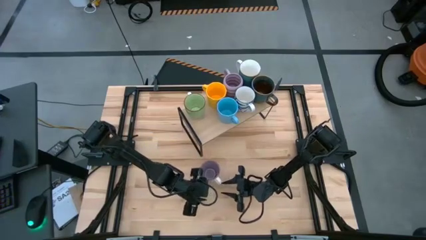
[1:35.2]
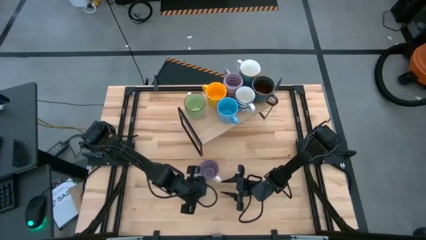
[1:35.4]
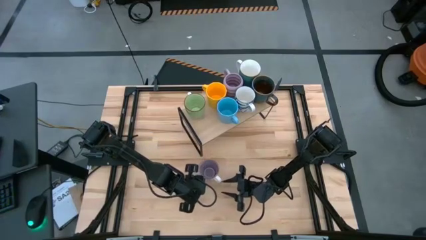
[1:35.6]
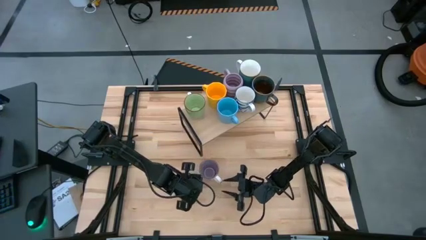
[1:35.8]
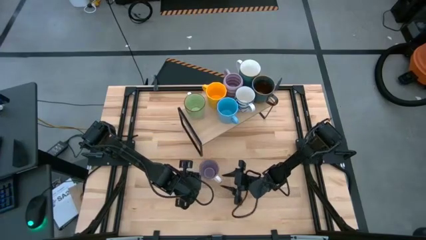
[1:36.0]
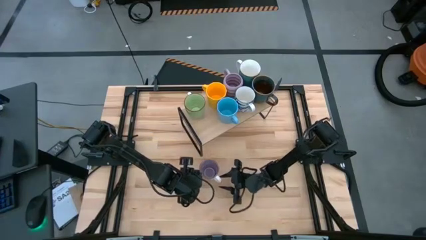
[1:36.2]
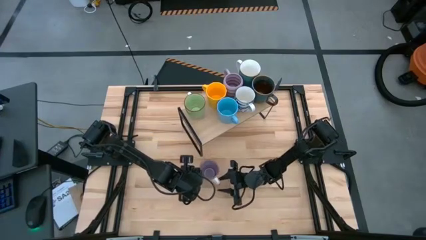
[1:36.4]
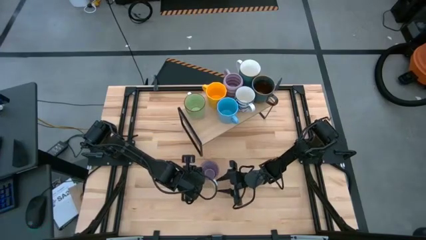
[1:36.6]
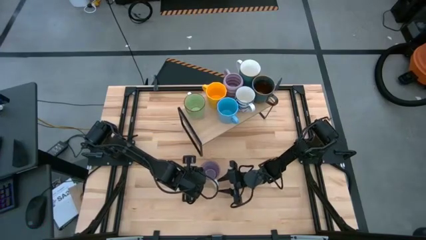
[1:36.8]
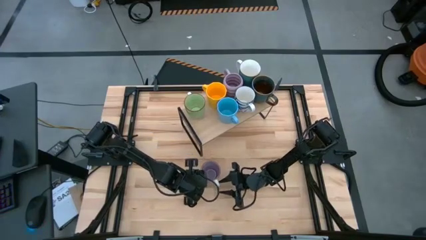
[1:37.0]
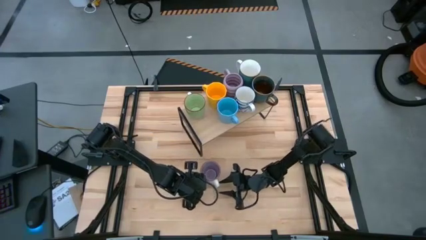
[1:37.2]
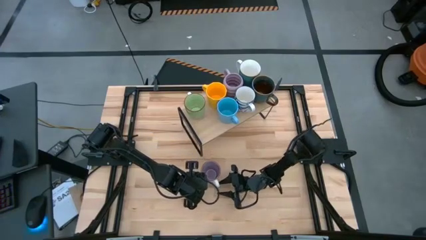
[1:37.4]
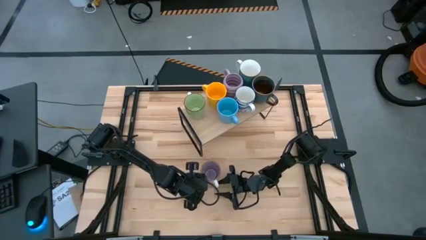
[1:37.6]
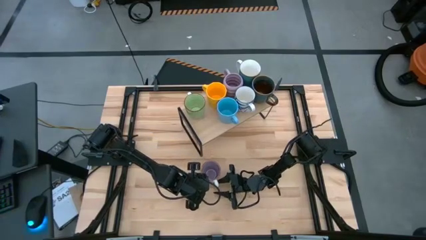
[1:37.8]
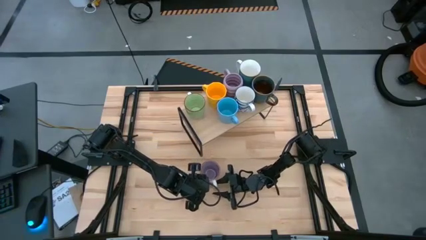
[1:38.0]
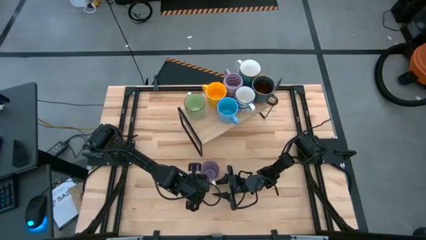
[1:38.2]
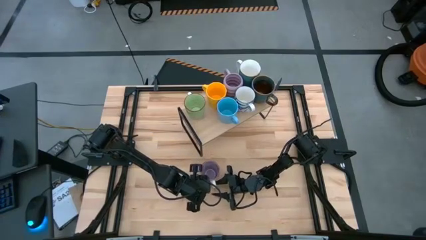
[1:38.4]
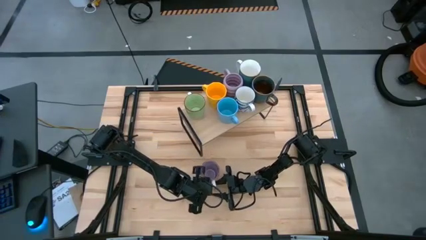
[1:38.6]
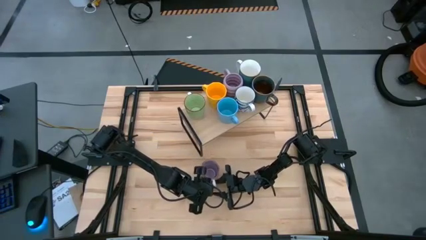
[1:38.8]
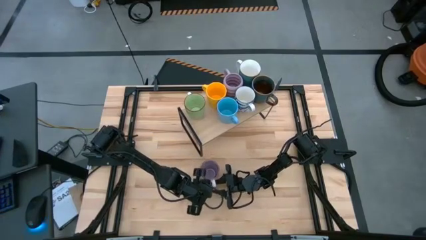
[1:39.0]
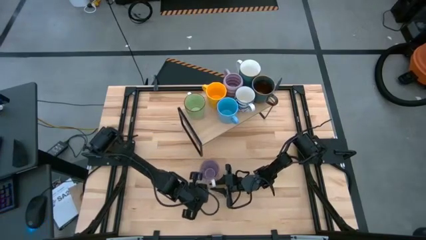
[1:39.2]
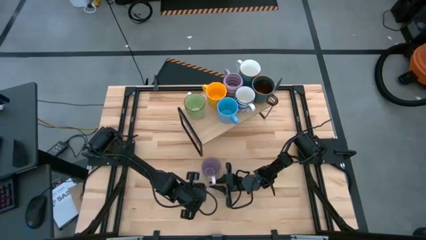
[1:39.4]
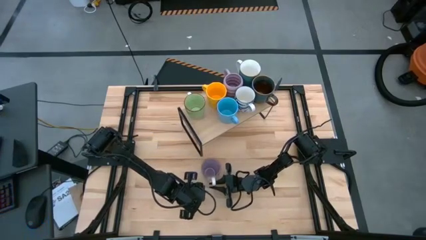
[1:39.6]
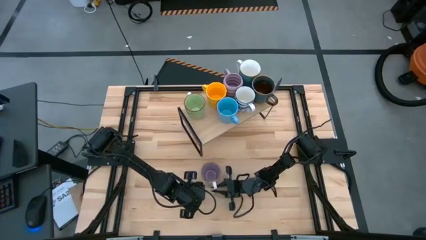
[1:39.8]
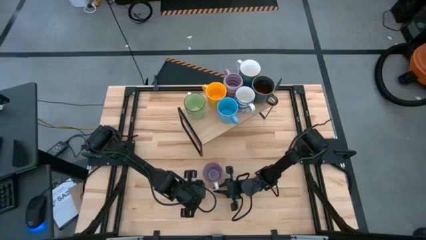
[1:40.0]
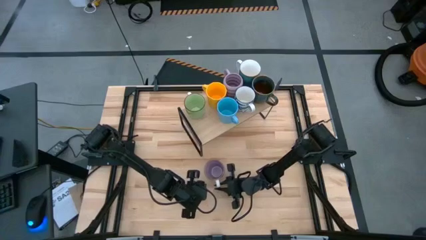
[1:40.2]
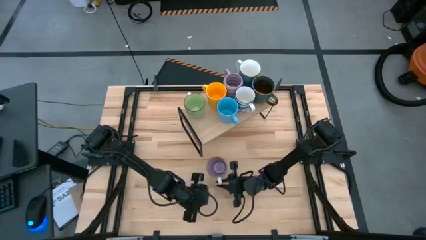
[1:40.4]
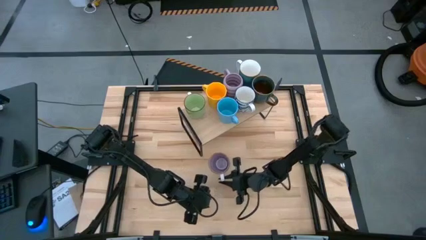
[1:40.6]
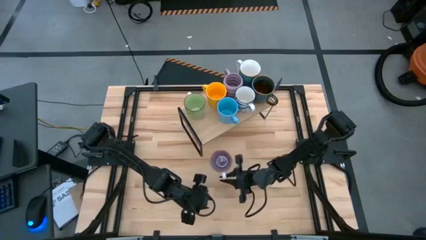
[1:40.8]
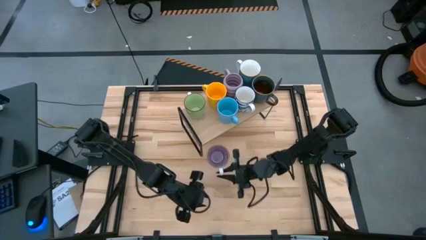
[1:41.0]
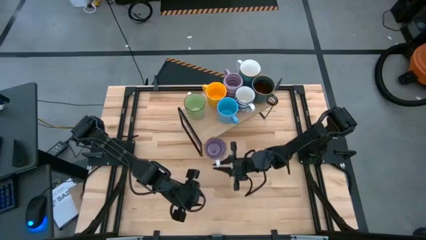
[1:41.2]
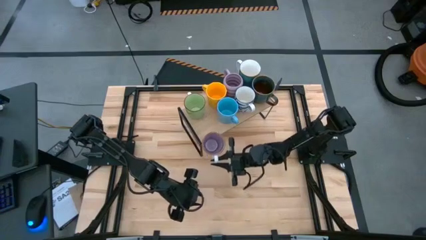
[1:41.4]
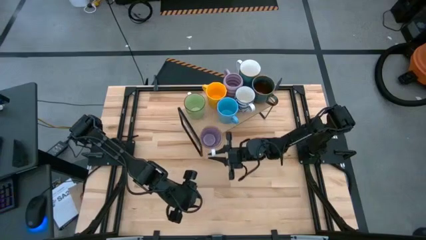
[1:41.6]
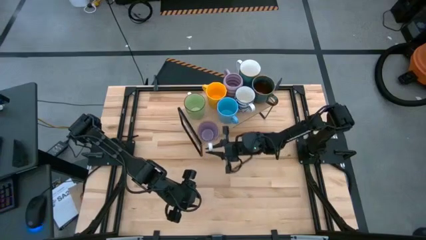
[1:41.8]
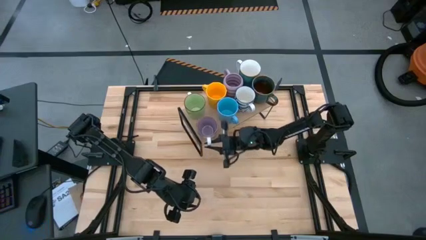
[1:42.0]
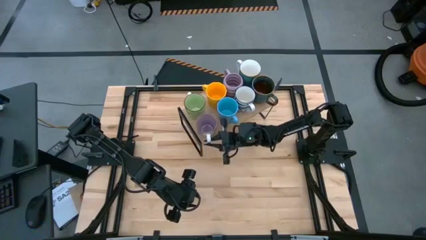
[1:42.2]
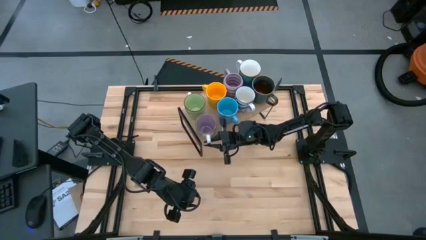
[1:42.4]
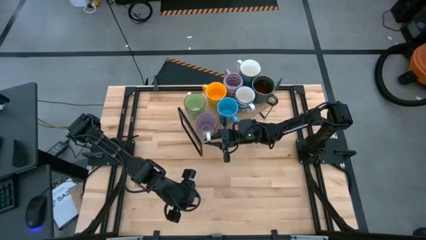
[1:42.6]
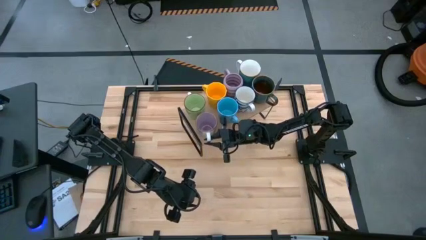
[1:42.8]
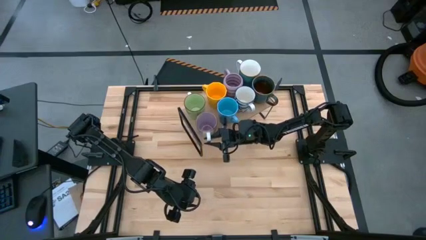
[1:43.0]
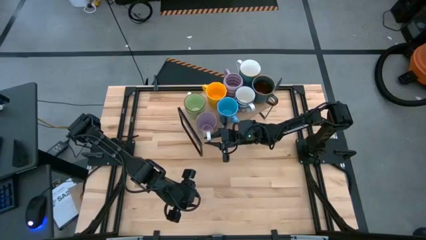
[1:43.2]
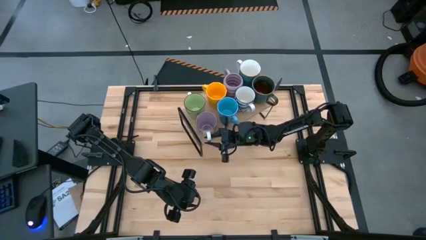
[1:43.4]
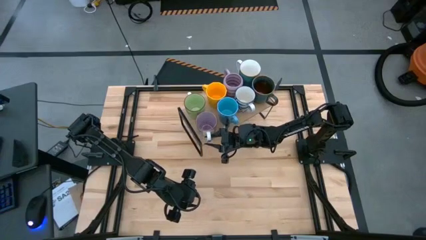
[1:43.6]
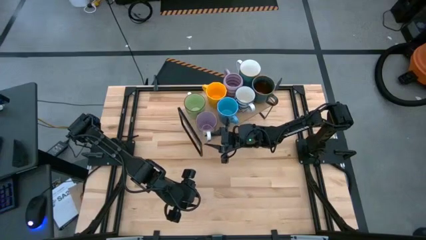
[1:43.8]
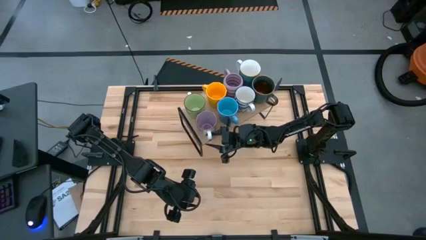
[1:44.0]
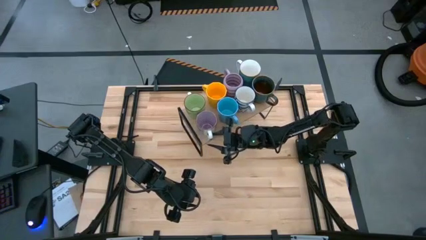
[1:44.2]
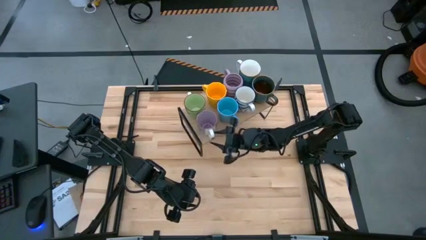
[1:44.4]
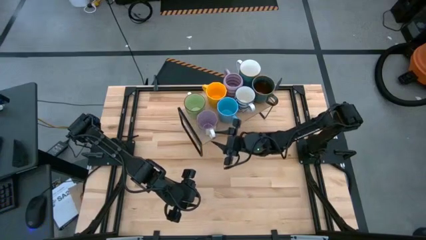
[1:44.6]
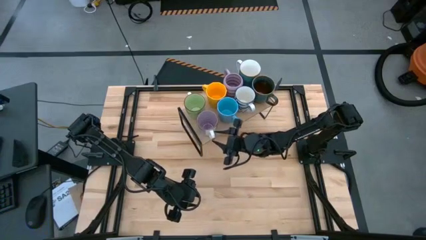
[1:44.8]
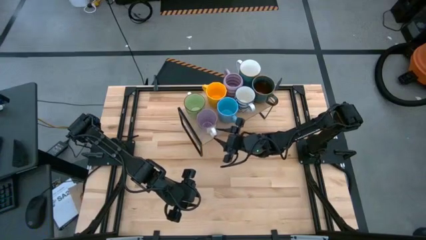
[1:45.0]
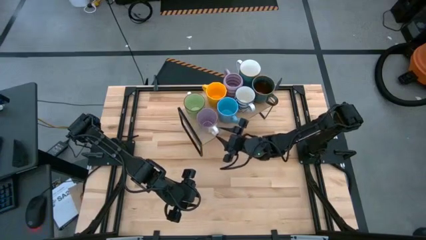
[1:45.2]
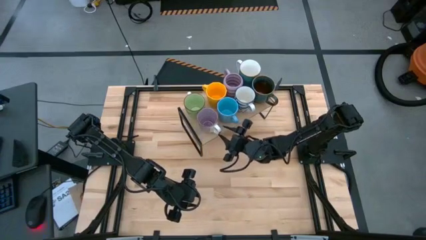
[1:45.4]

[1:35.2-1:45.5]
Task: Place coffee mugs
Put the purple mug on the shelf

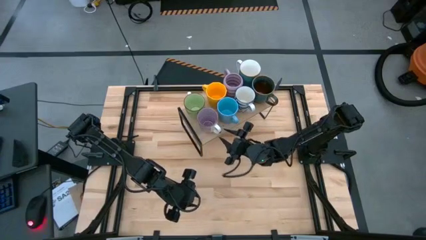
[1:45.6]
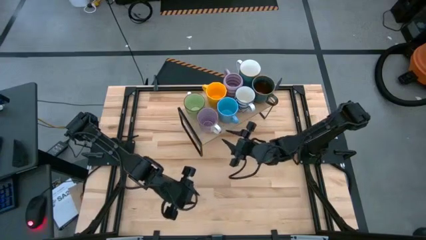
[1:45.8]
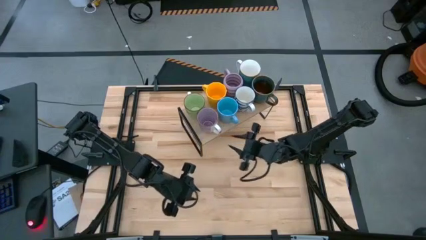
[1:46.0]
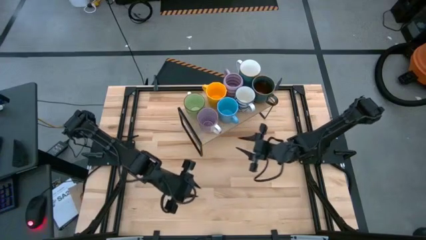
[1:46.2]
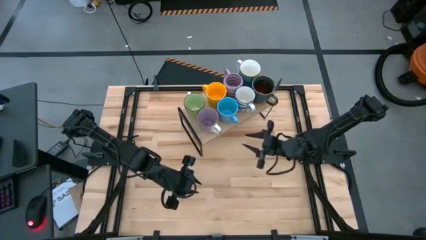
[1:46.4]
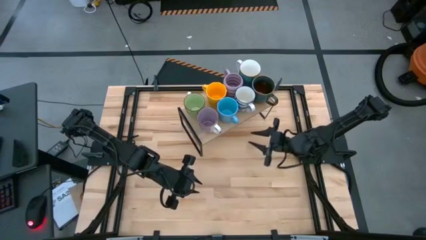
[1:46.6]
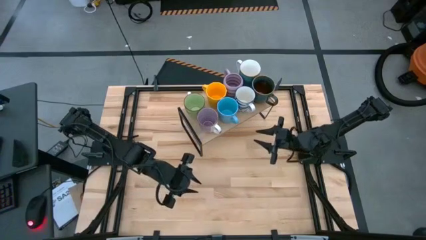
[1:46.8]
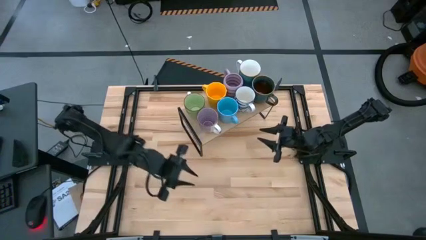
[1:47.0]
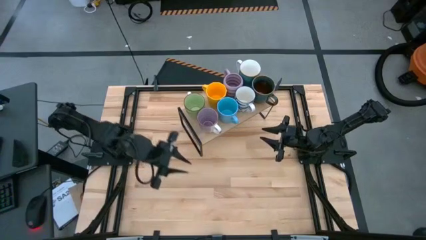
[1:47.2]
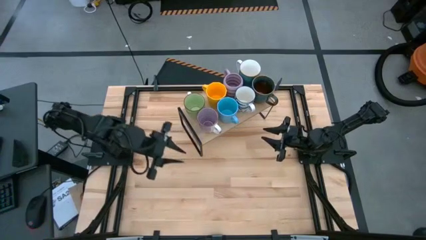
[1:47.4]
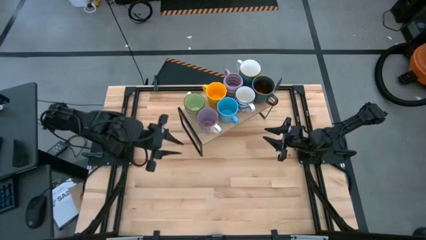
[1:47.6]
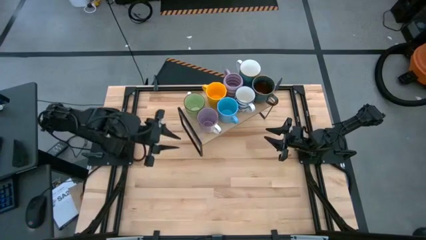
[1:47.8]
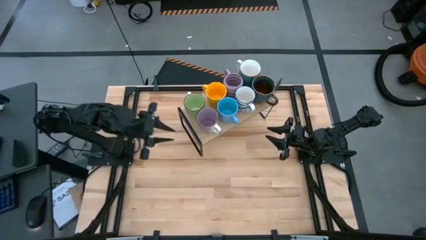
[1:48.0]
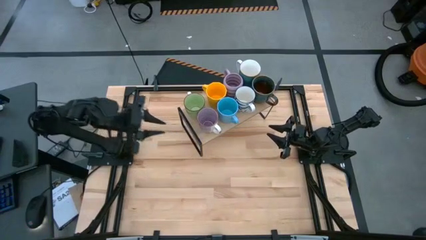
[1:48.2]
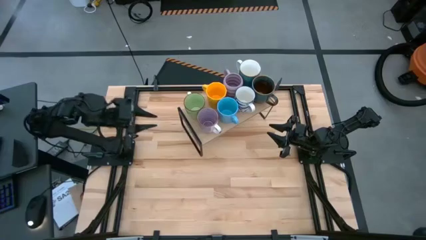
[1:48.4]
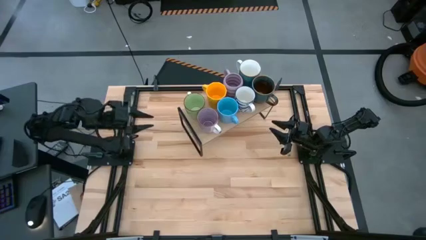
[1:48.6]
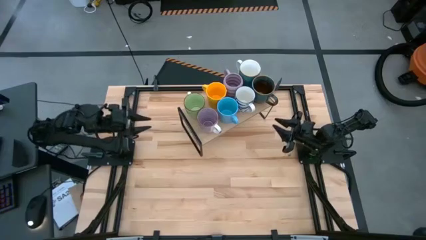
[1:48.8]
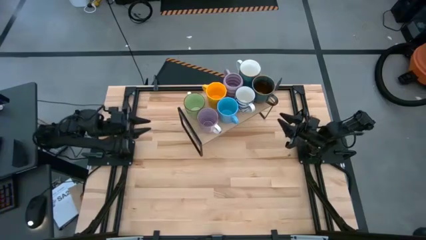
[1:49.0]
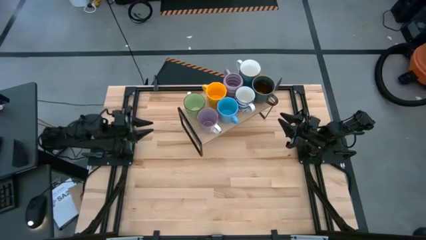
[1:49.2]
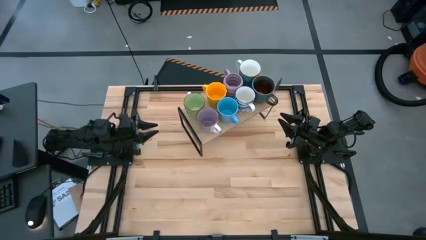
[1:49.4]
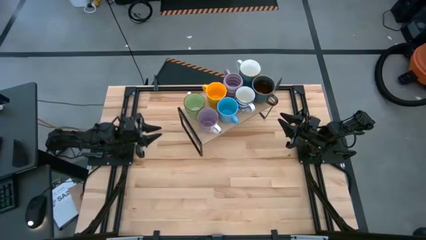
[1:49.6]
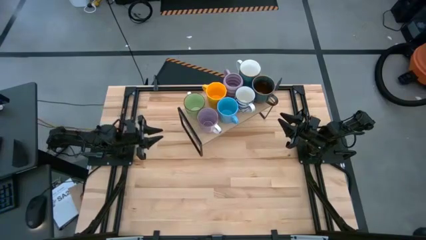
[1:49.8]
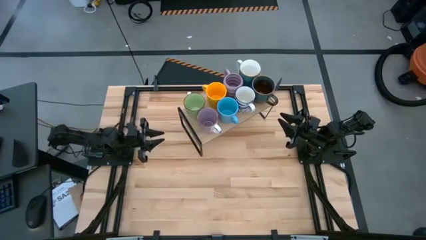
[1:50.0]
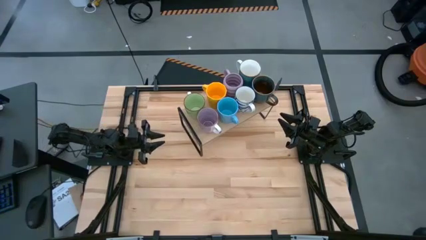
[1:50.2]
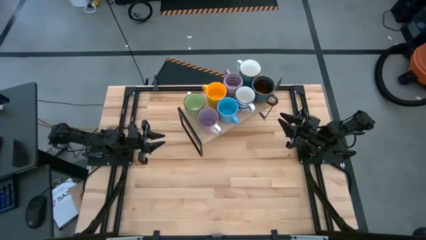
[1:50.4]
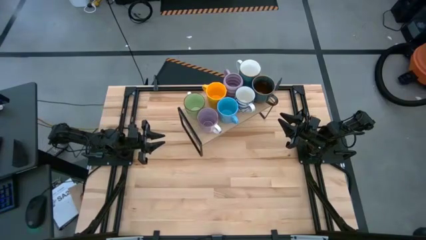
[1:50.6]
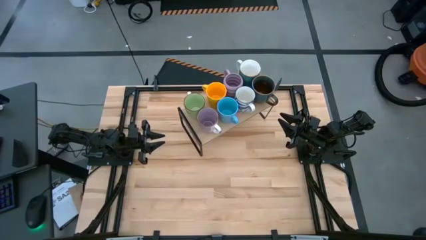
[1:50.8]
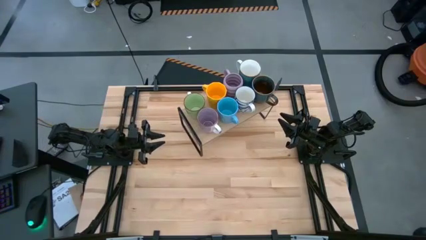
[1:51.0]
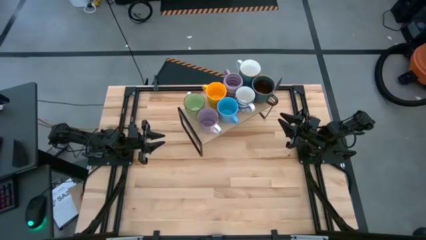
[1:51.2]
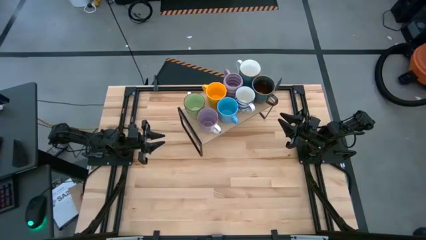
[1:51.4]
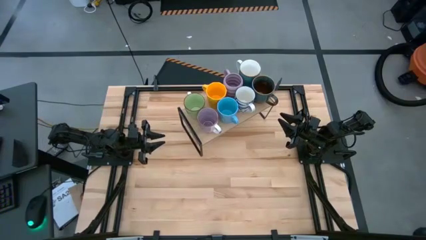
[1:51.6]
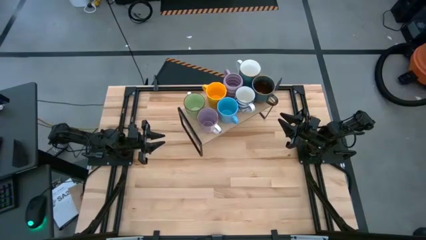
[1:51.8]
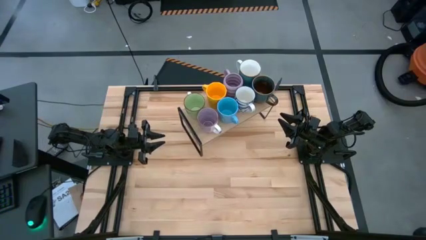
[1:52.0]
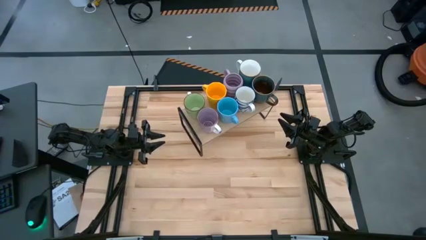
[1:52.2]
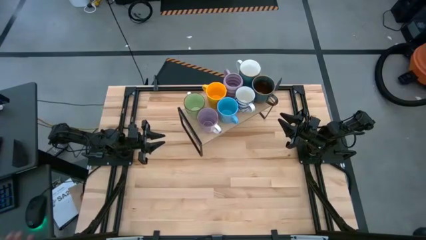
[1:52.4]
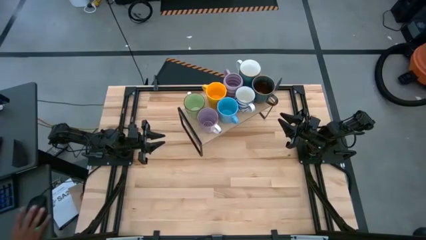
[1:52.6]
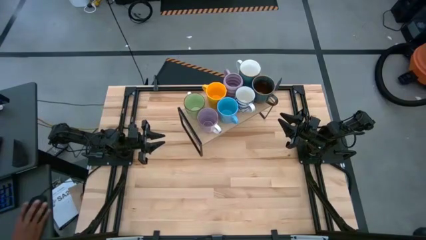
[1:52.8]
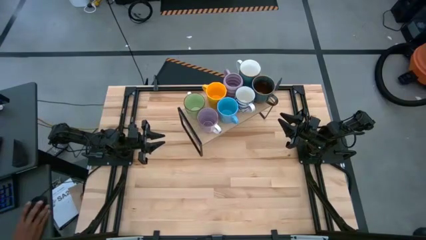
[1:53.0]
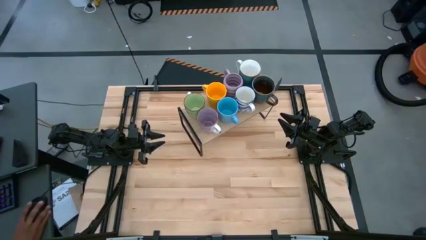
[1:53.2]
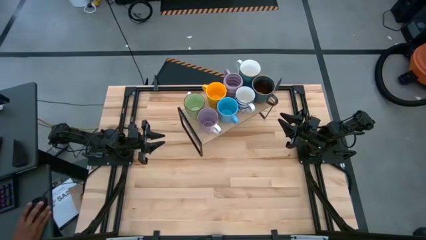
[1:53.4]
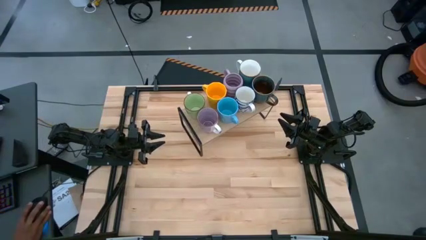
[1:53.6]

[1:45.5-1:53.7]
Return to Home Position
